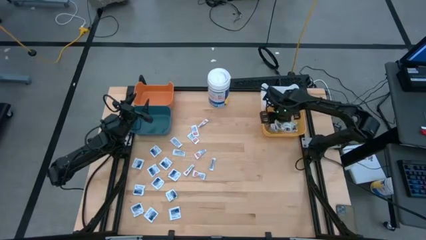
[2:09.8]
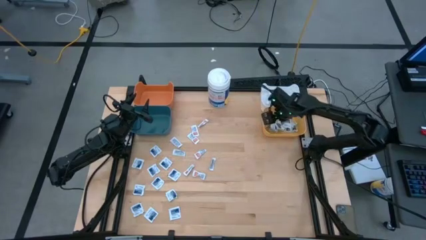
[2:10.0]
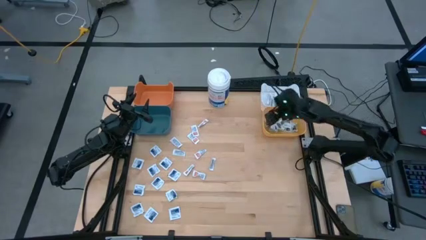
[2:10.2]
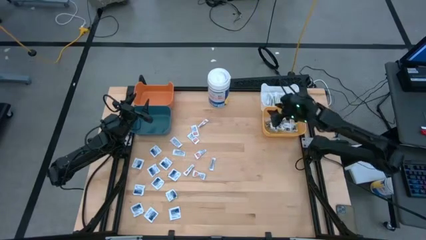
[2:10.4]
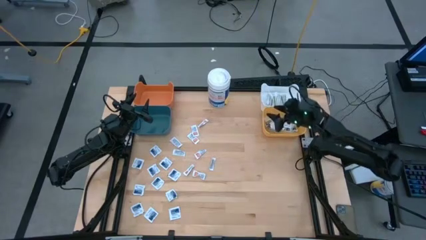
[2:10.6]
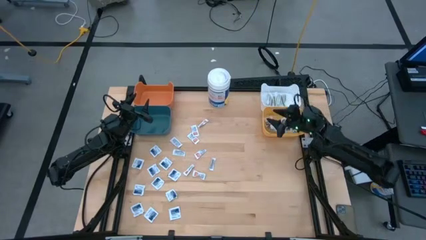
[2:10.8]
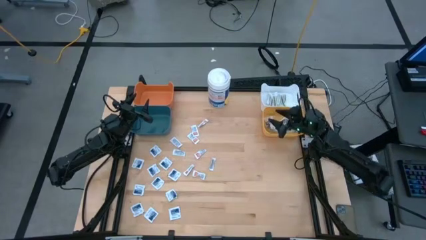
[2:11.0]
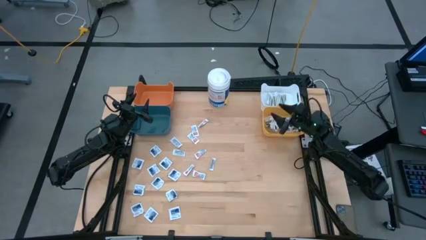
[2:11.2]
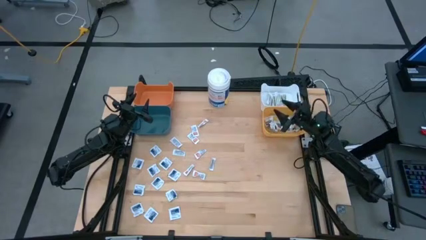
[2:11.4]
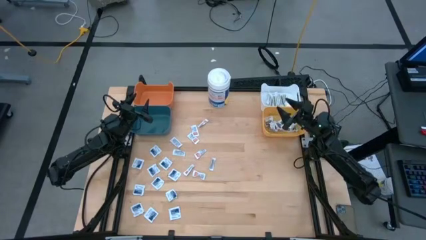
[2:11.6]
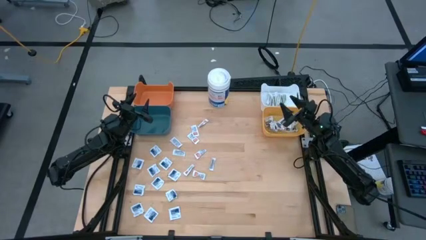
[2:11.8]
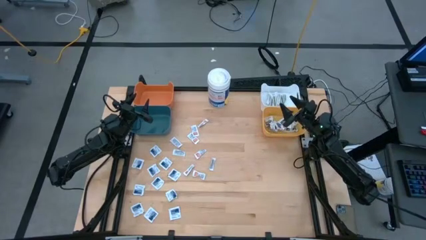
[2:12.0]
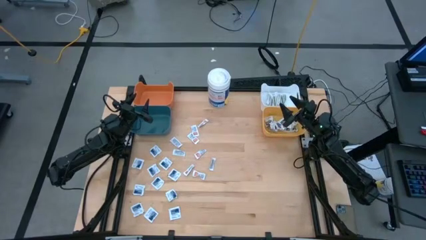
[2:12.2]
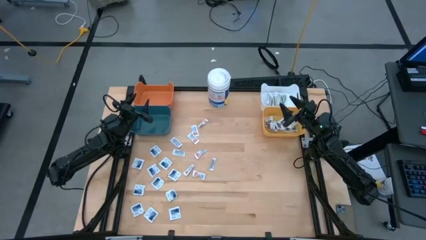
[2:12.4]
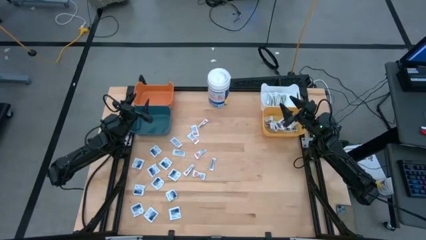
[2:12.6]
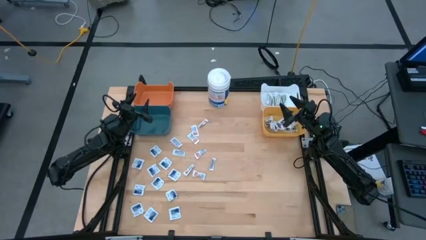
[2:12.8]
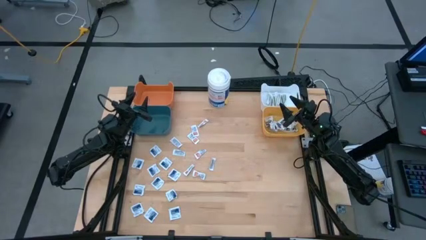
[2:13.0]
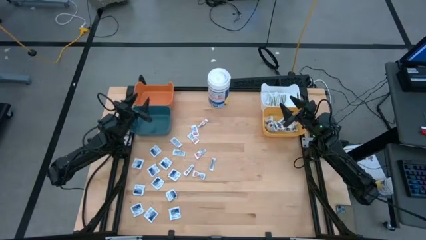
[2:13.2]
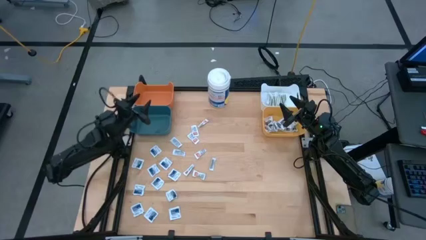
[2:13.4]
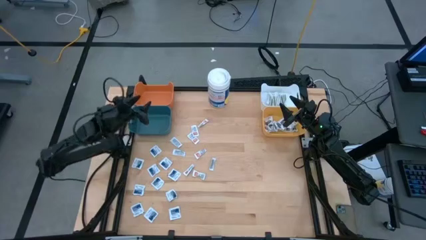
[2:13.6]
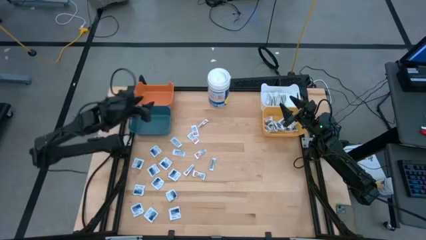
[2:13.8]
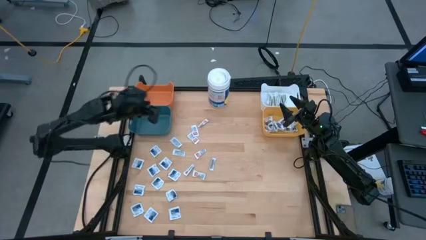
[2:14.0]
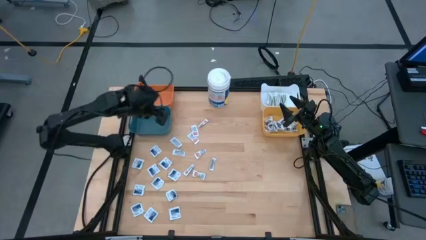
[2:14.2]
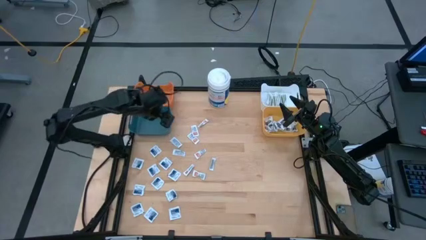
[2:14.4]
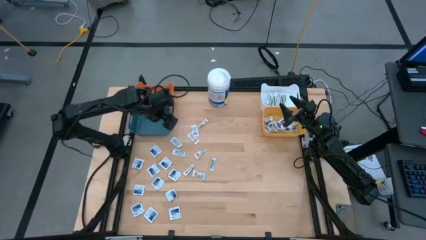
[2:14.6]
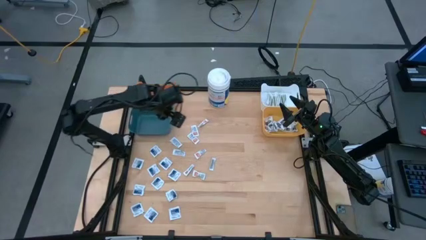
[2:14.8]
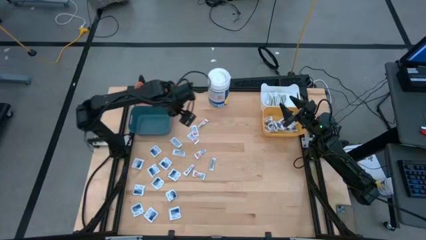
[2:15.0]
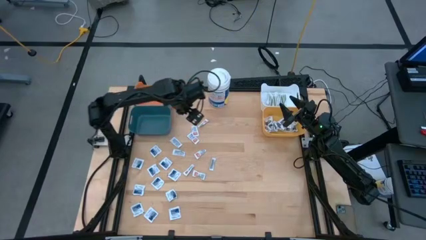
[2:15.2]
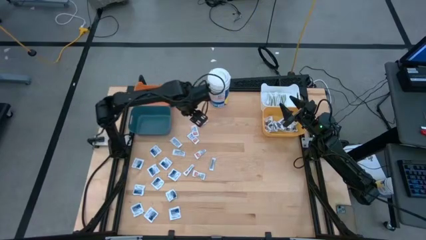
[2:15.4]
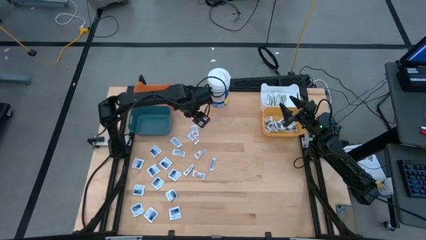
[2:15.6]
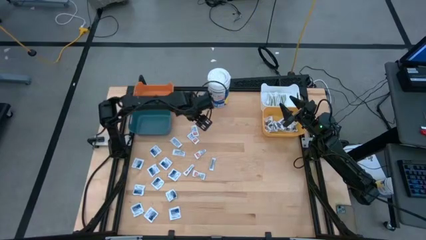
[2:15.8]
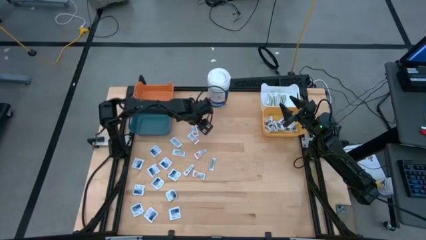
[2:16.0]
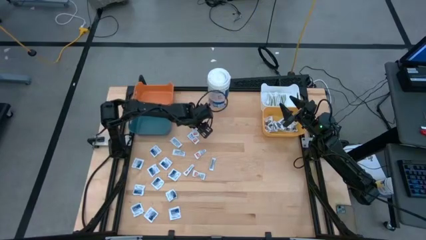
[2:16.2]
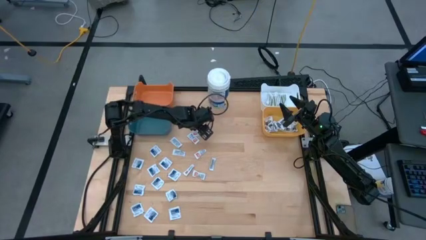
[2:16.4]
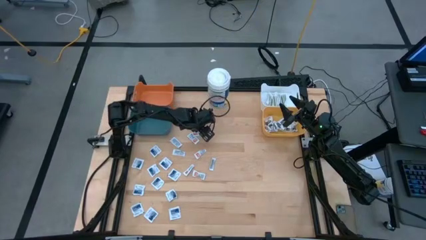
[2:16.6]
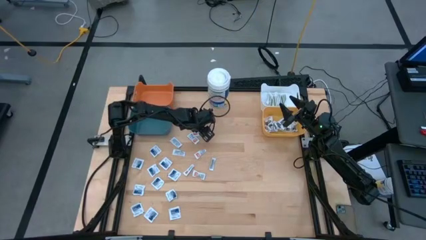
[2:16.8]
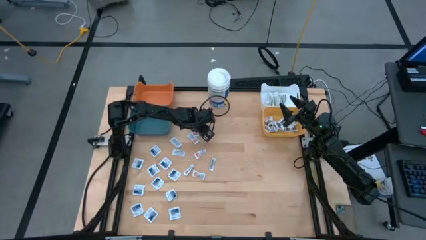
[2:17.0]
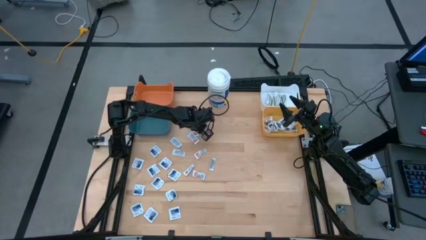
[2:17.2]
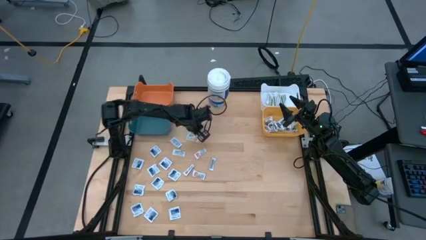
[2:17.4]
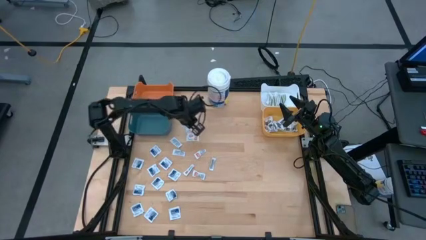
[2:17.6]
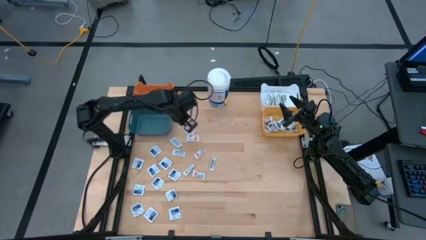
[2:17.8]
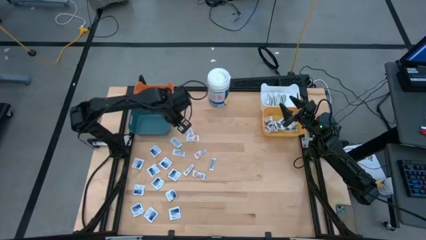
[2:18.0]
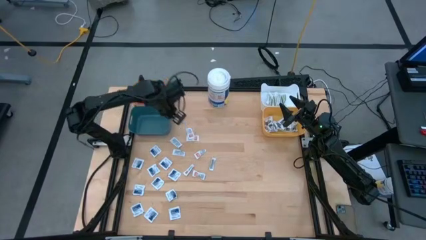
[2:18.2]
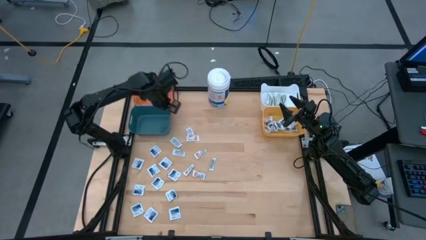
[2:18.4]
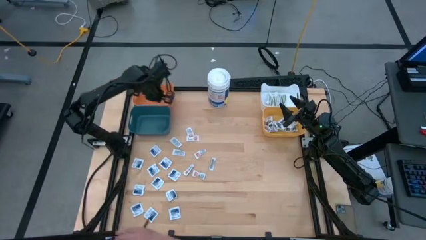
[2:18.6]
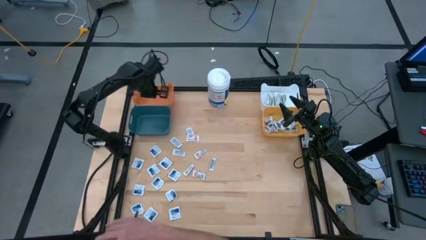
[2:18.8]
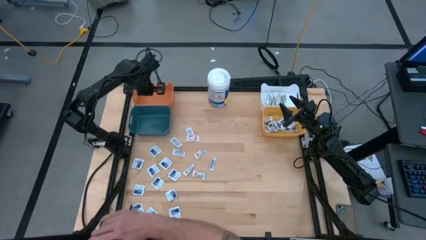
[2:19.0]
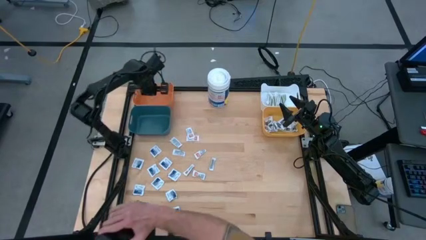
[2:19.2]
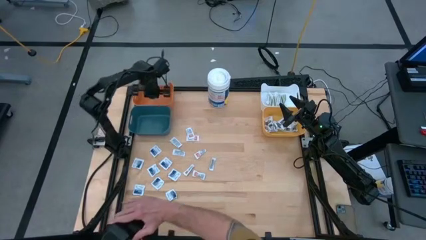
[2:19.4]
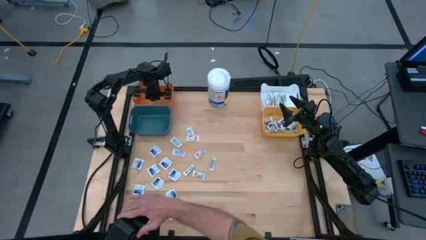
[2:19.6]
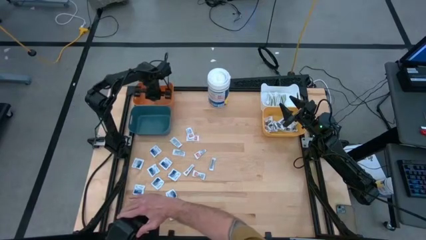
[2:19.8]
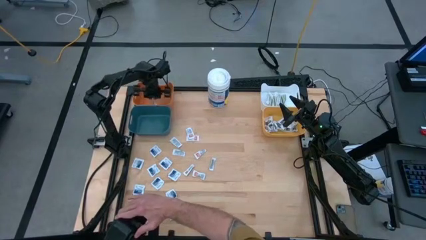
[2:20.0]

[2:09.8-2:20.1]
Task: Pick & Place First Aid Supplies
Put the orange pad into the orange bin

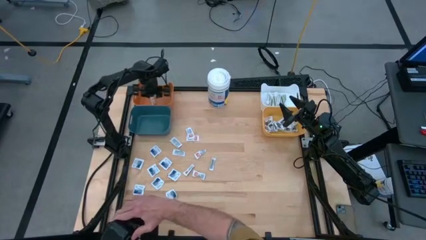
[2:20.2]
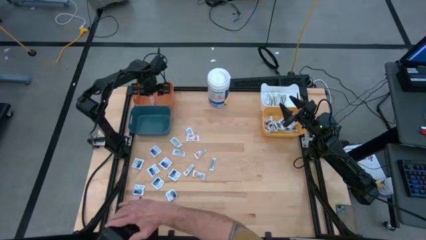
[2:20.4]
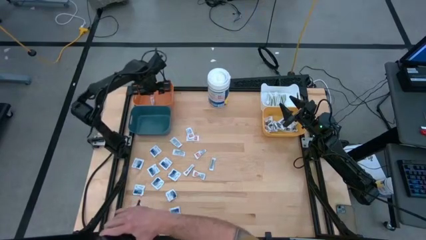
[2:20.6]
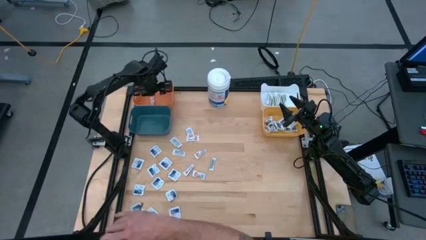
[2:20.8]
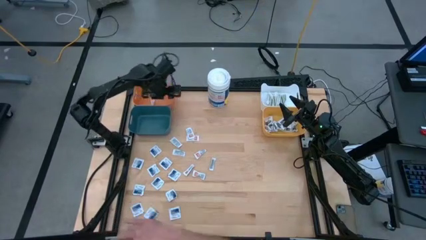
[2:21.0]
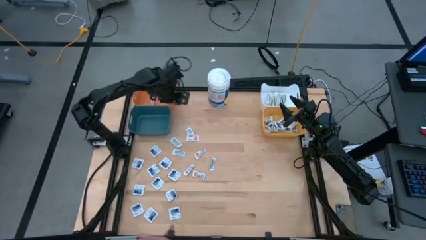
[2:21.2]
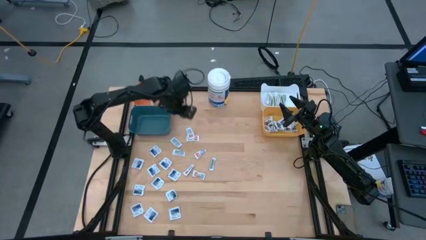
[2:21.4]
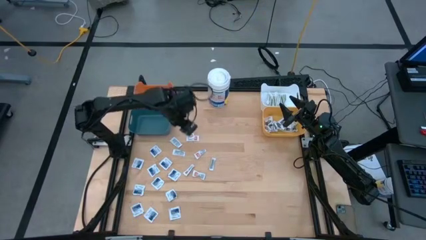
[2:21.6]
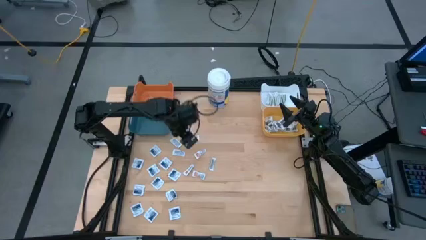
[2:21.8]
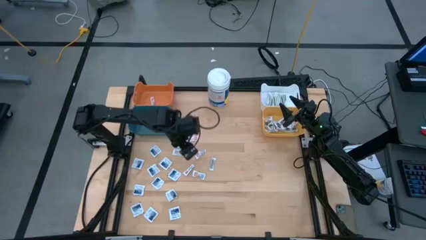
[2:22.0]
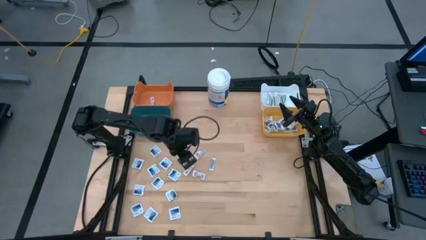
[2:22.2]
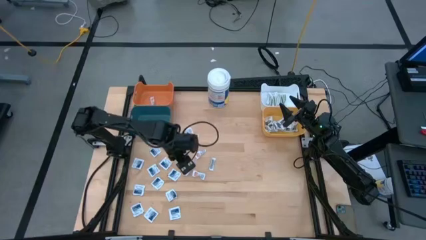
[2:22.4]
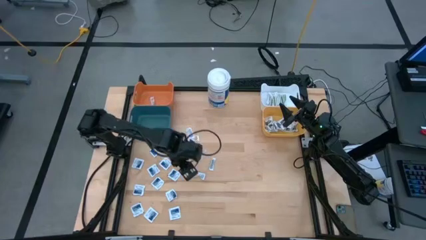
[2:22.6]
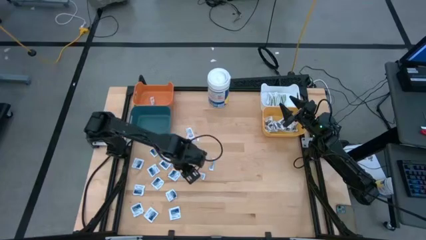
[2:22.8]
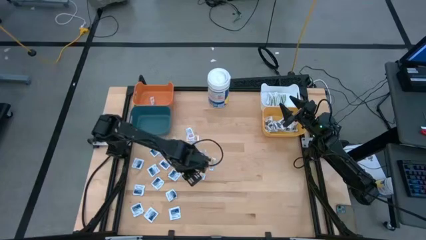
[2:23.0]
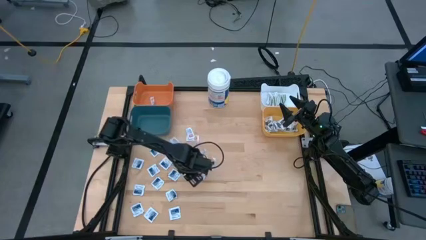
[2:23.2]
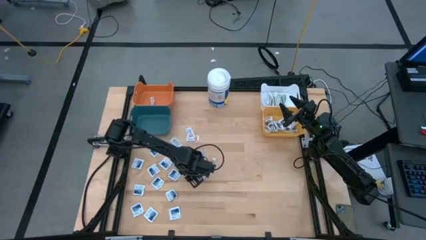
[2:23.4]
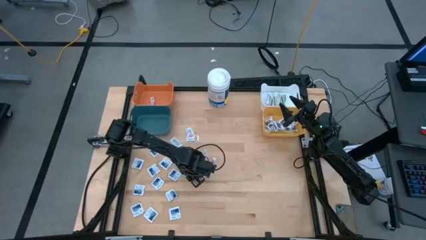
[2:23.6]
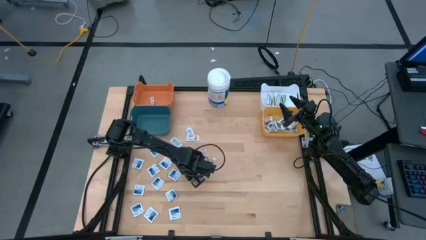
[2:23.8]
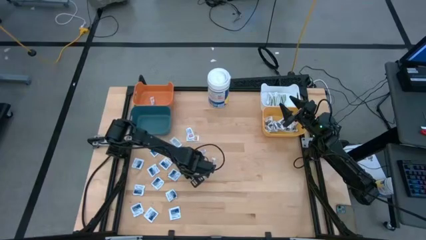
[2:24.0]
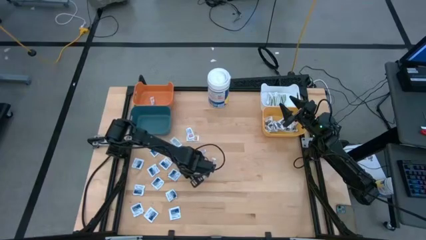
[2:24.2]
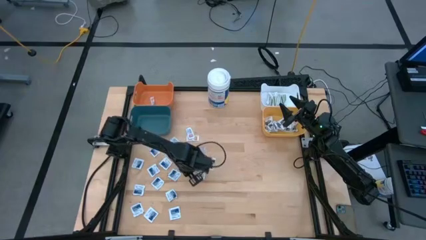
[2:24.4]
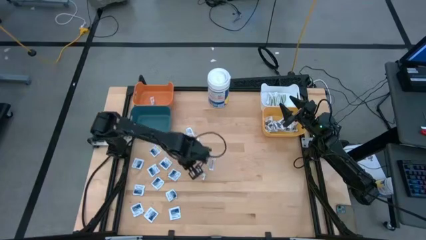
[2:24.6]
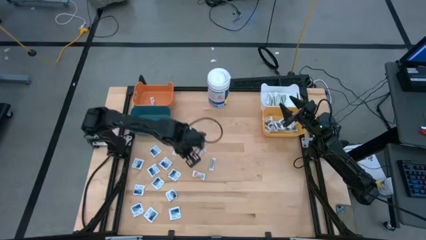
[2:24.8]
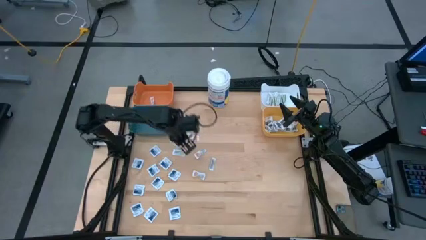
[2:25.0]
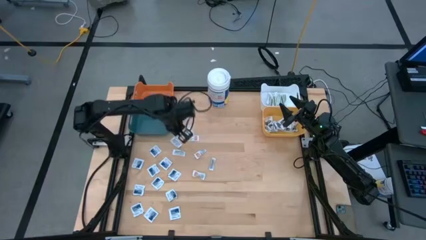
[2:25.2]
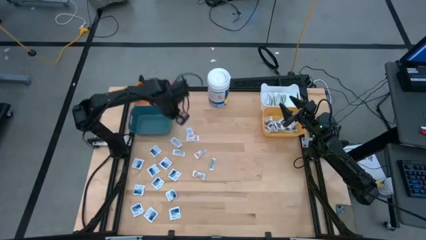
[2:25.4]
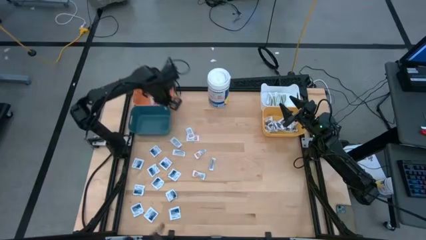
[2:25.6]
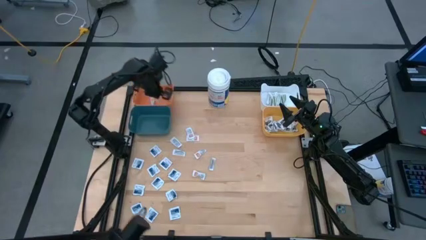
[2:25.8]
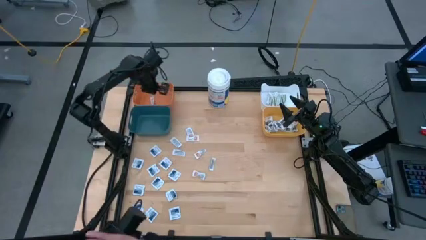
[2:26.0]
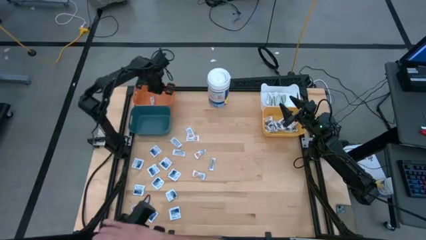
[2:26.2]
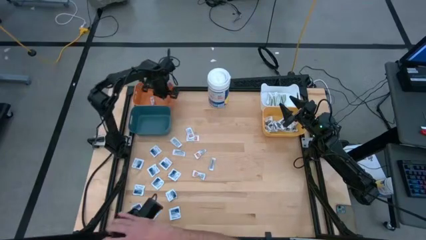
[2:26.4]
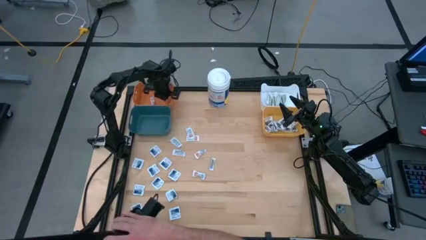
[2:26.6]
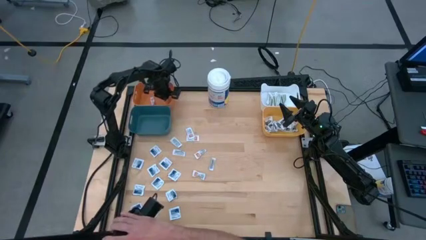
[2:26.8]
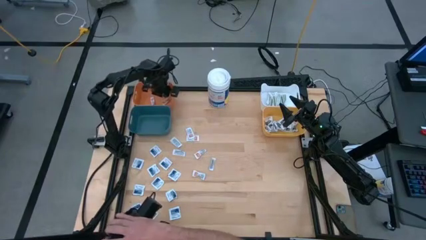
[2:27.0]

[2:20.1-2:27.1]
Put the orange pad into the orange bin
